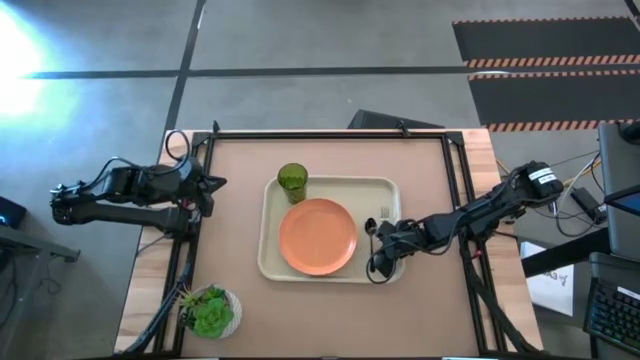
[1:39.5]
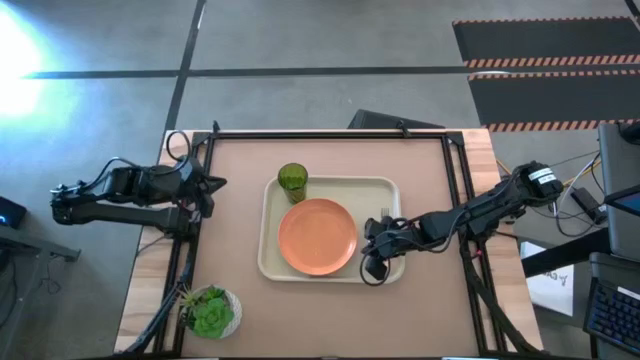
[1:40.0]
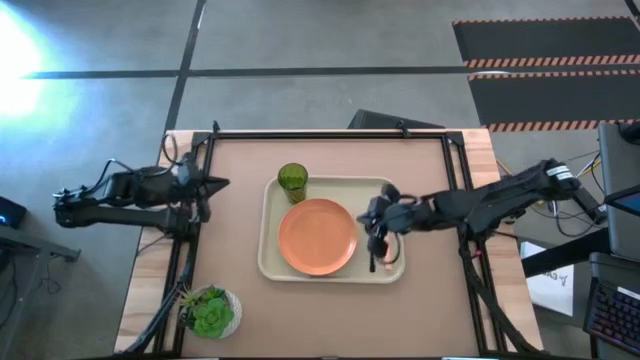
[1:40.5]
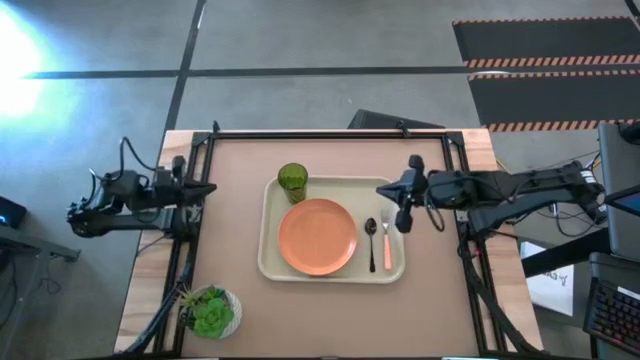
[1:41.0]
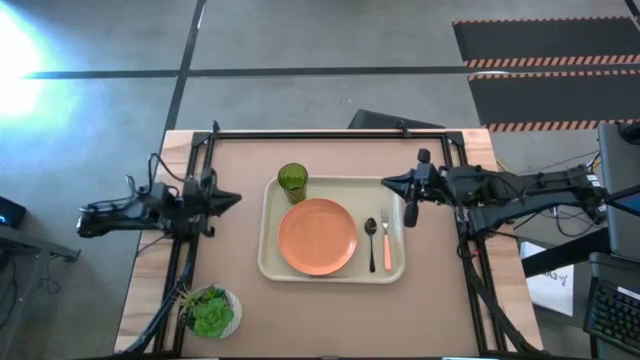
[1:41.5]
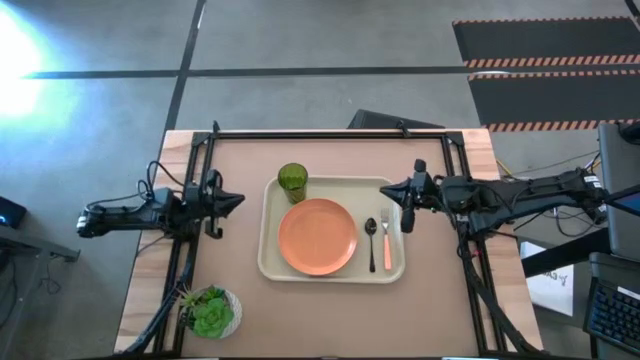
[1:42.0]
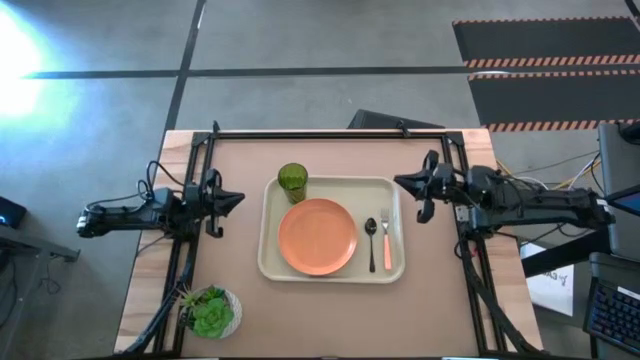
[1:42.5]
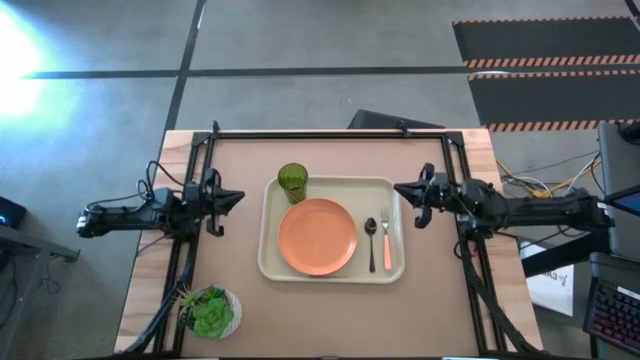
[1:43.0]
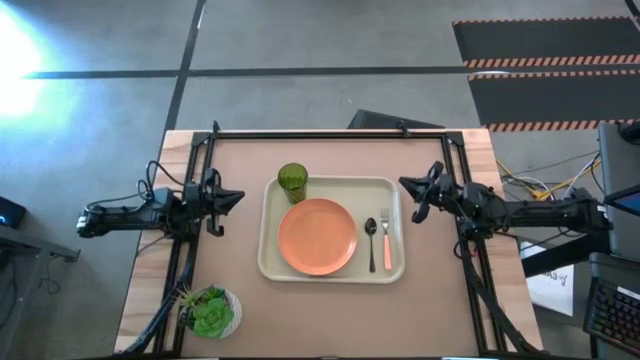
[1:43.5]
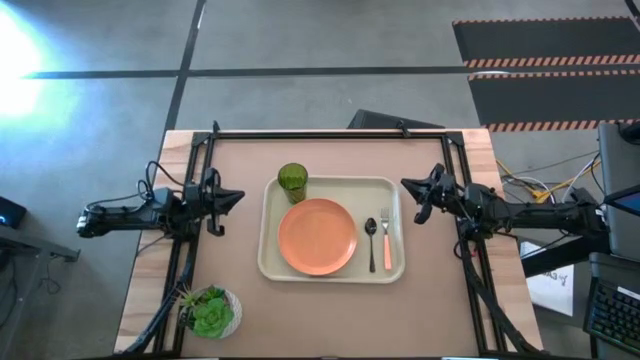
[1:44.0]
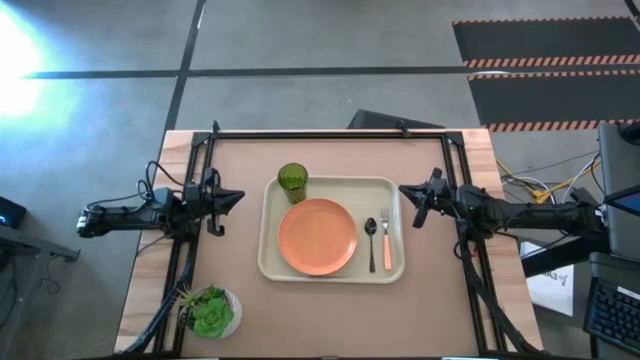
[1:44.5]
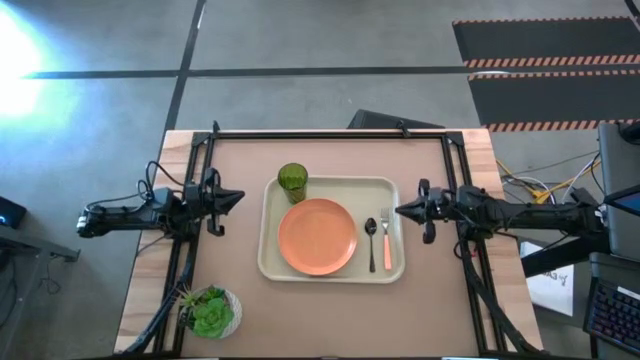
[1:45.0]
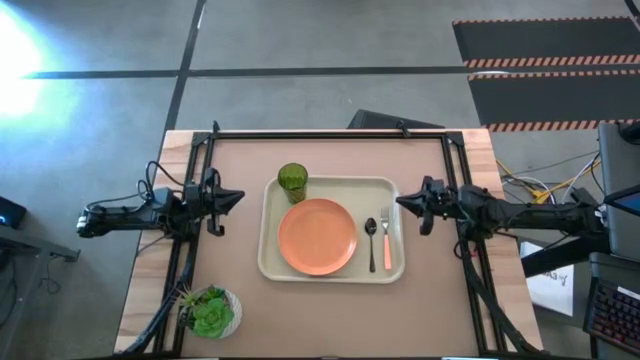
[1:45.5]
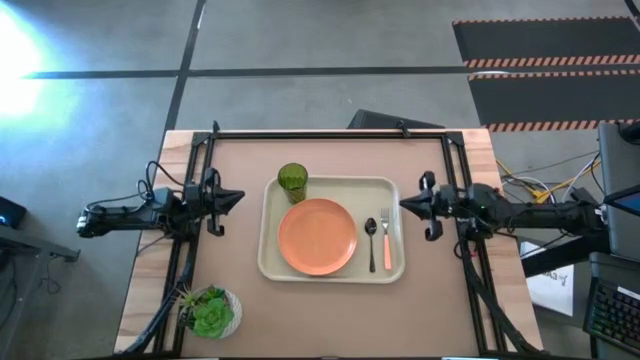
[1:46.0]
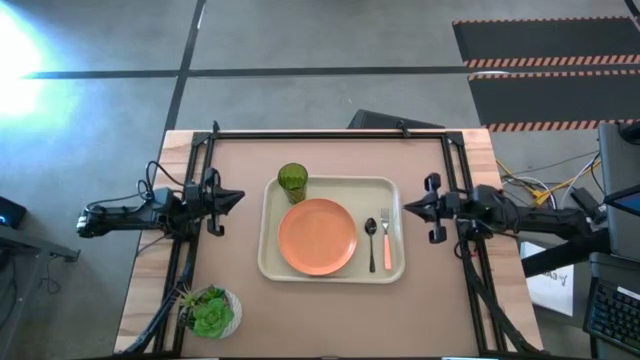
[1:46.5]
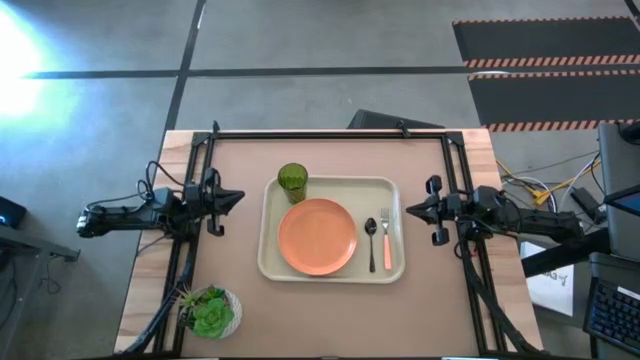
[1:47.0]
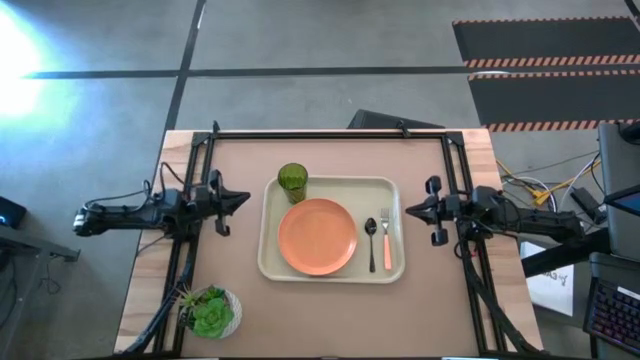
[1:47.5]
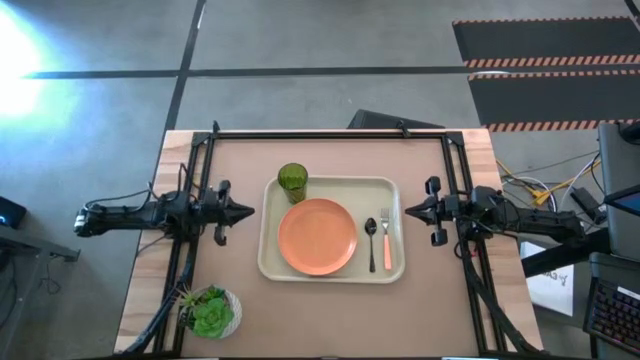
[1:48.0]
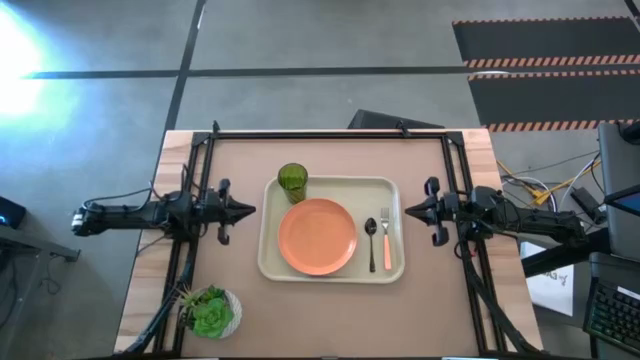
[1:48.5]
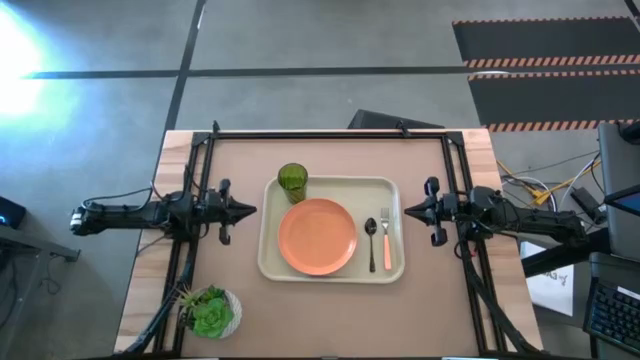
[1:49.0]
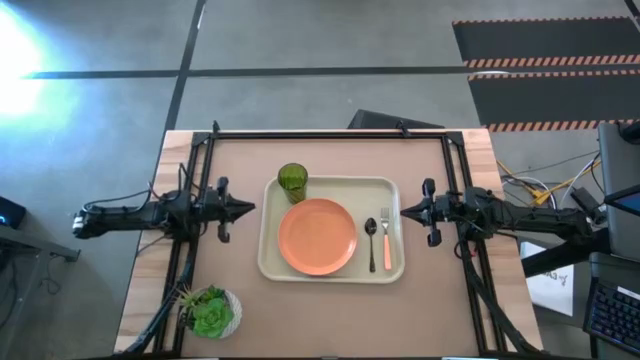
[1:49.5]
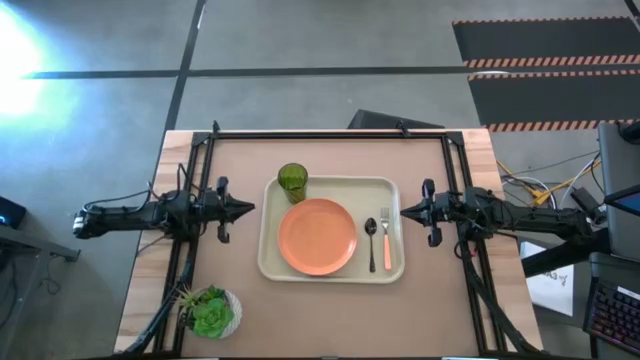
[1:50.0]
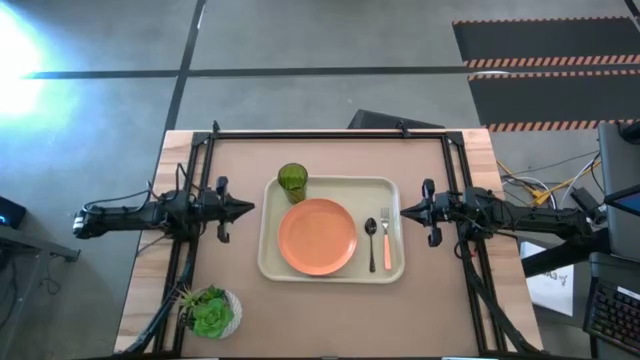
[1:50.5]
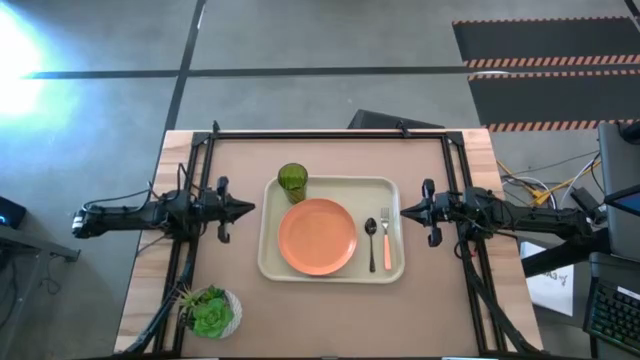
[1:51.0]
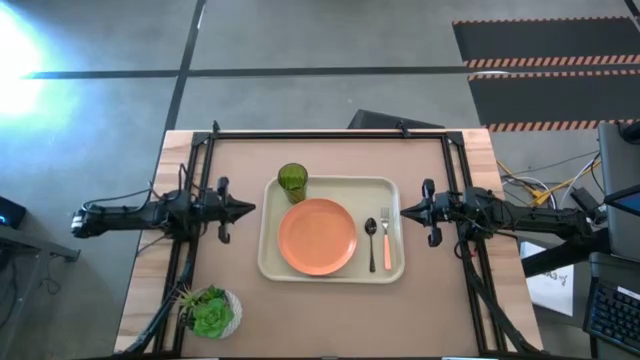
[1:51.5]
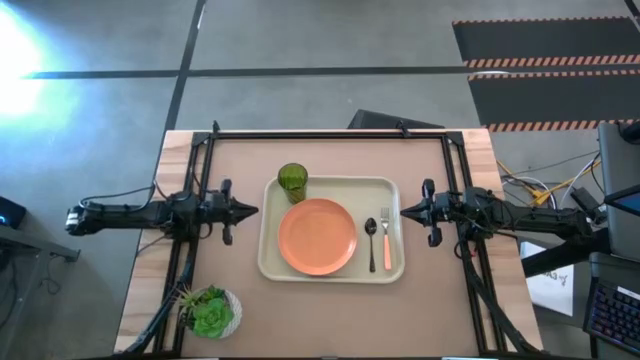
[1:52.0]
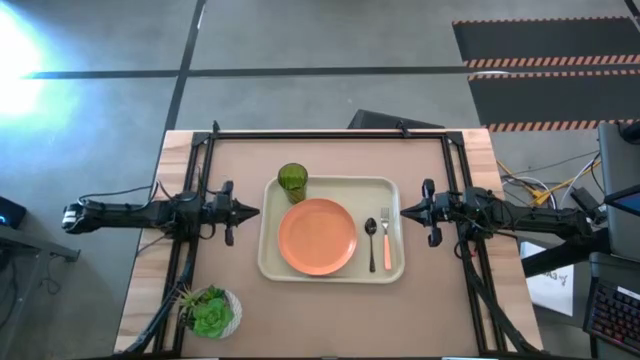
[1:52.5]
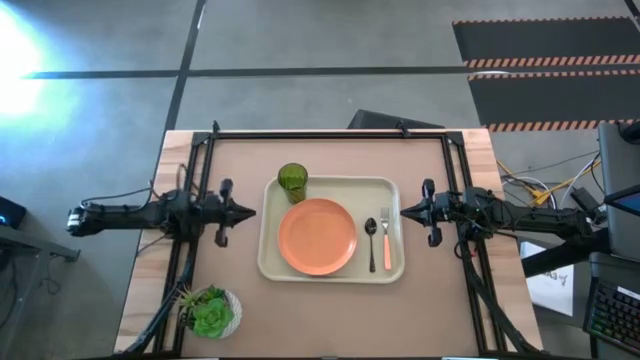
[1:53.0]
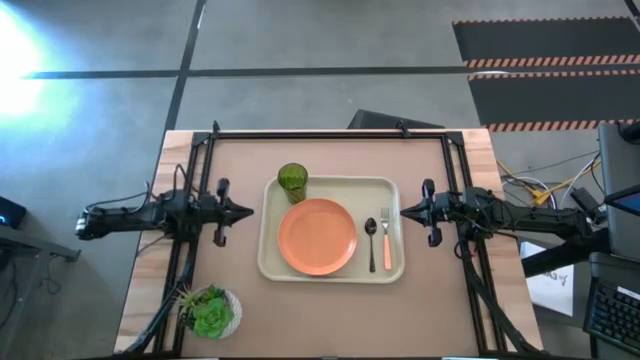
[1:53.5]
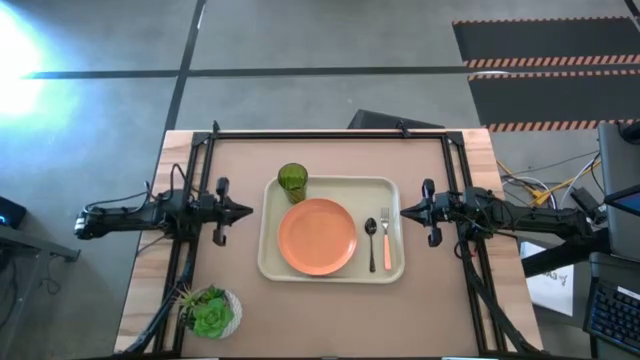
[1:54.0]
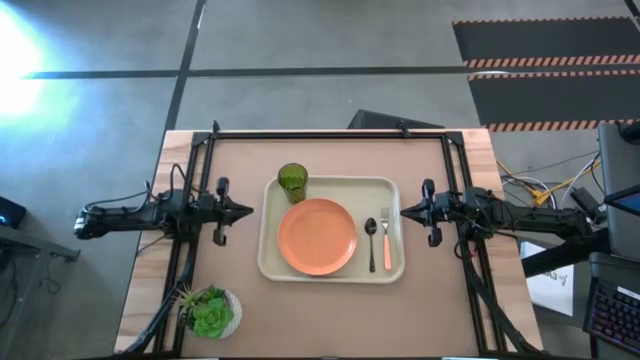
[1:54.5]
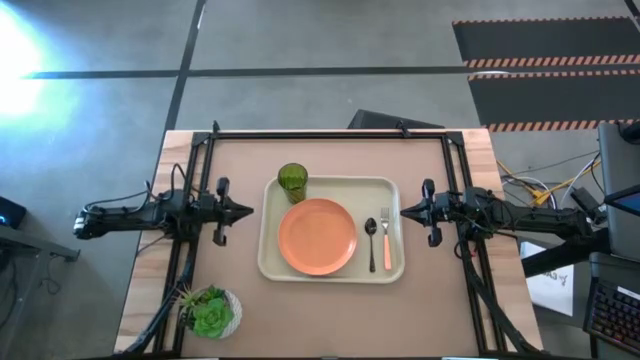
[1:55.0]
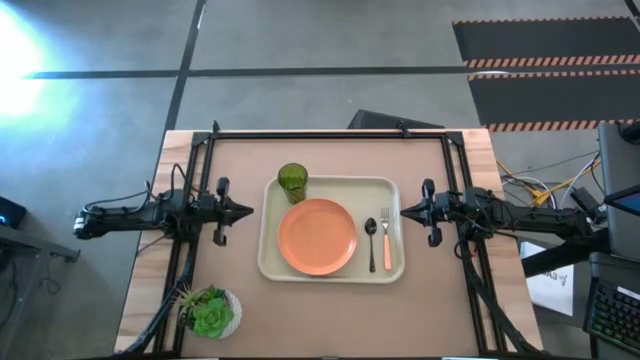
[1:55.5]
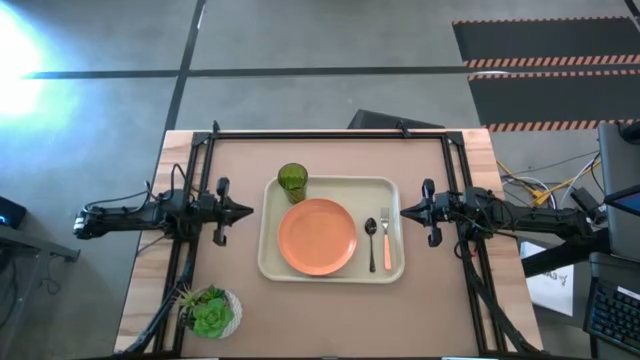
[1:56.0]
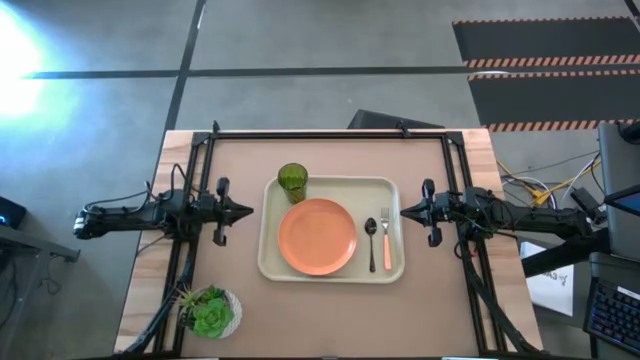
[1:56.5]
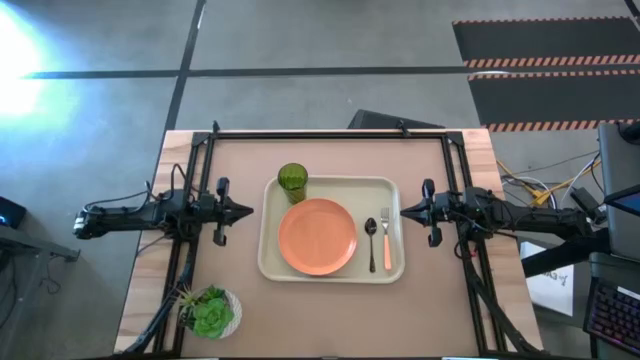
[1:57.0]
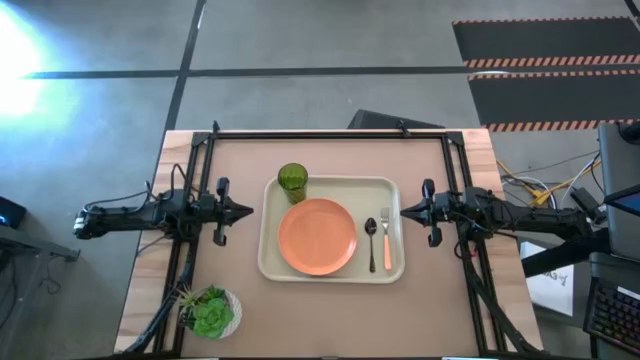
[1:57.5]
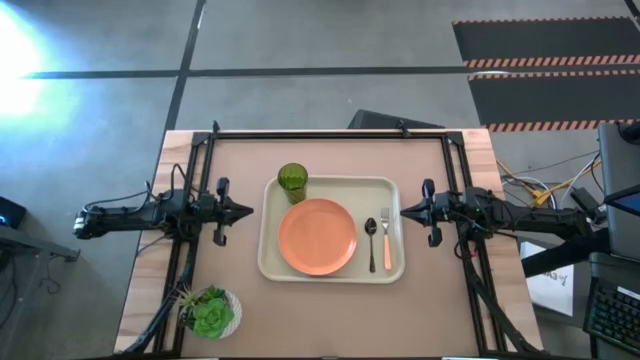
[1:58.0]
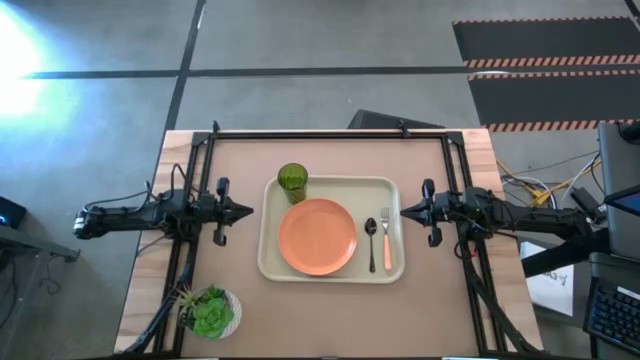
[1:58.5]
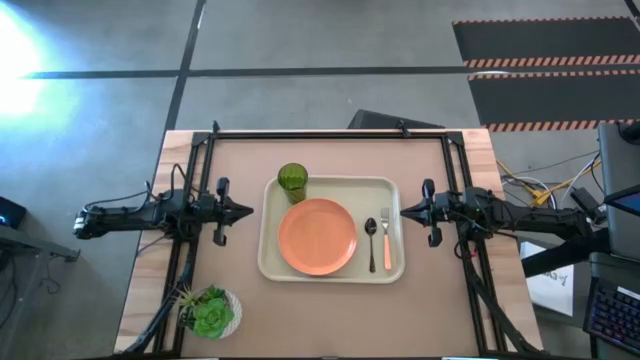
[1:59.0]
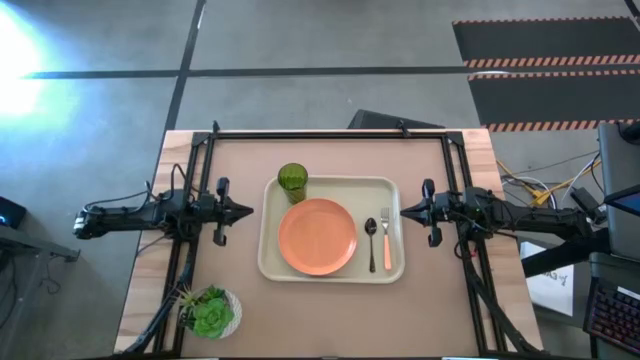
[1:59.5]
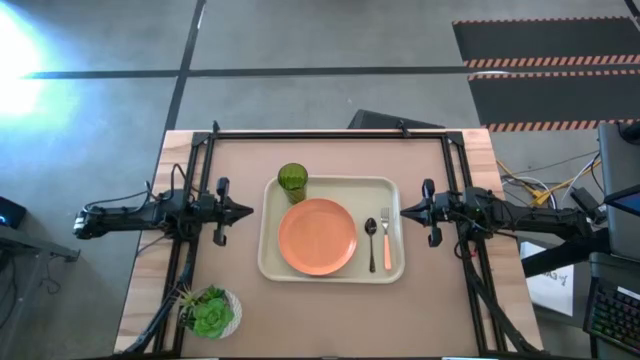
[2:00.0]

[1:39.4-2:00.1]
Task: Pick and place plate/cup/fork/spoon on tray
Return to Home Position
